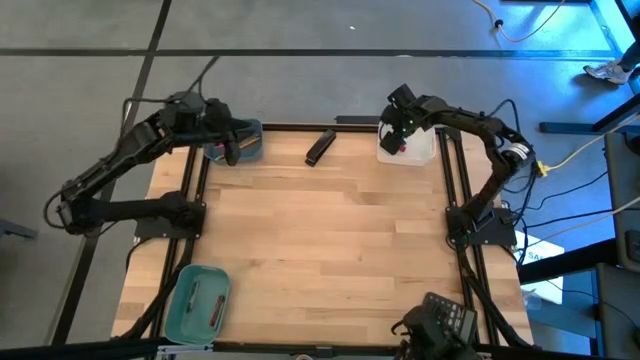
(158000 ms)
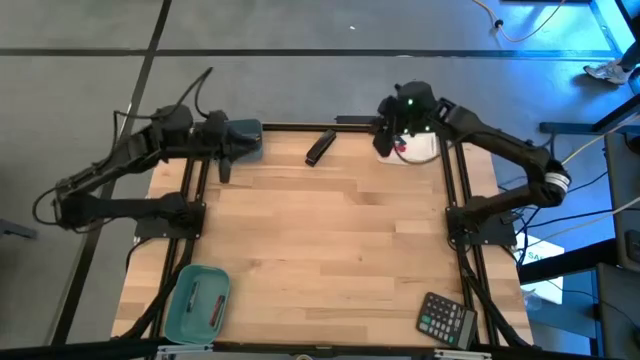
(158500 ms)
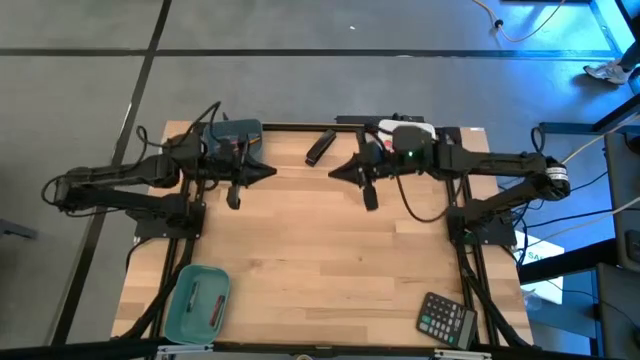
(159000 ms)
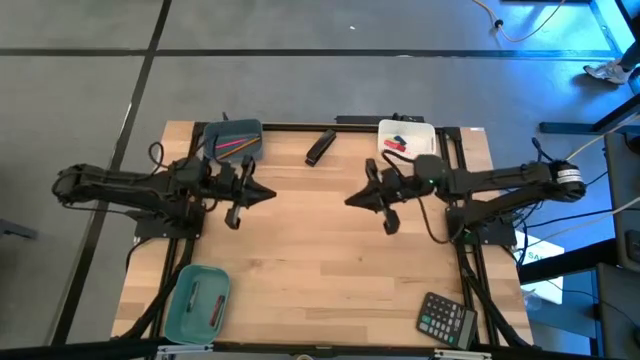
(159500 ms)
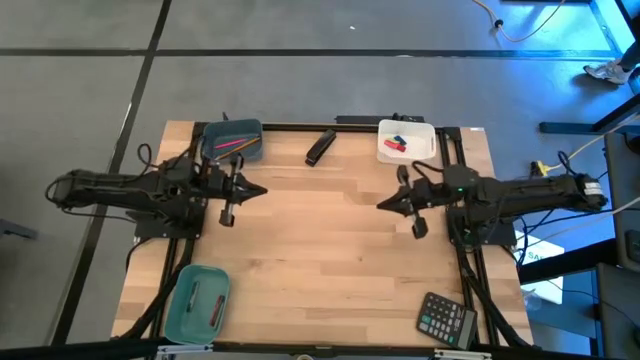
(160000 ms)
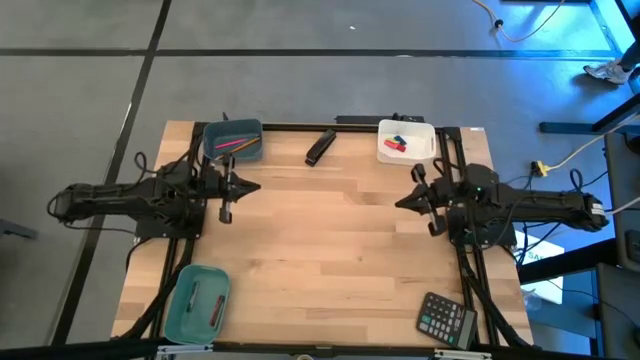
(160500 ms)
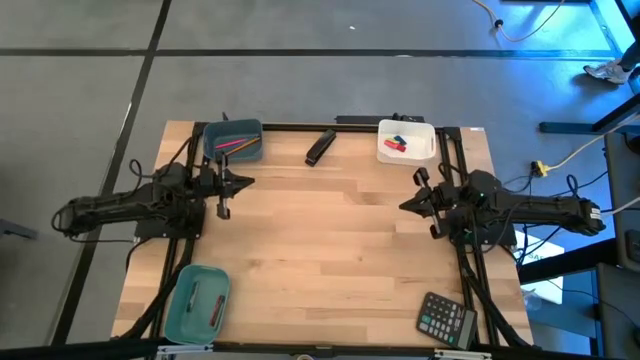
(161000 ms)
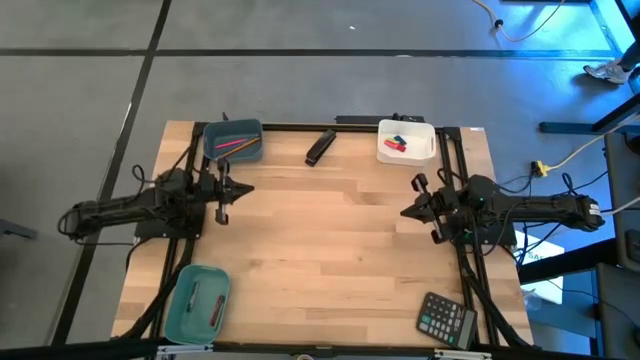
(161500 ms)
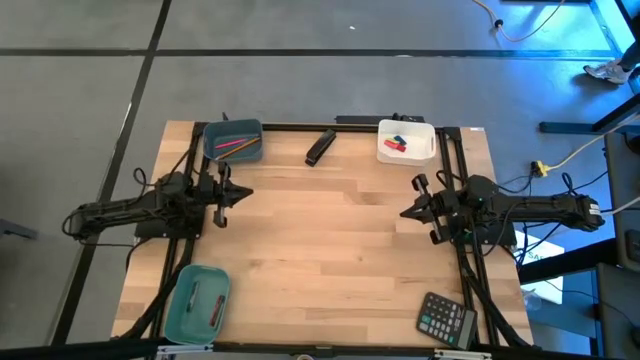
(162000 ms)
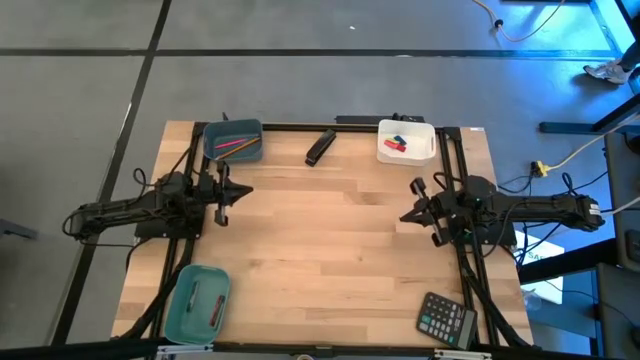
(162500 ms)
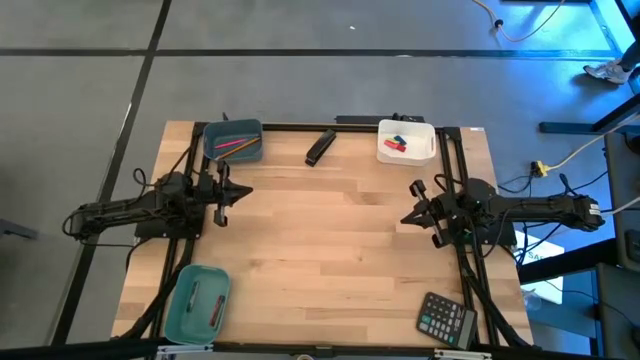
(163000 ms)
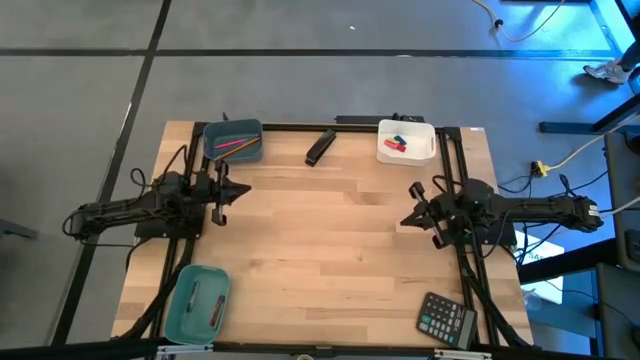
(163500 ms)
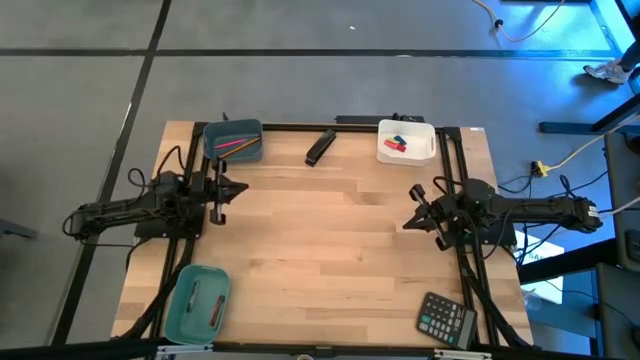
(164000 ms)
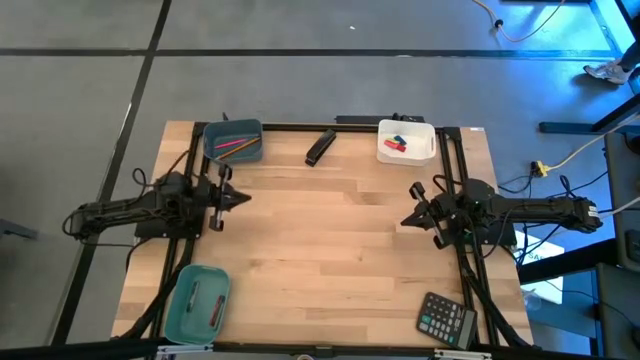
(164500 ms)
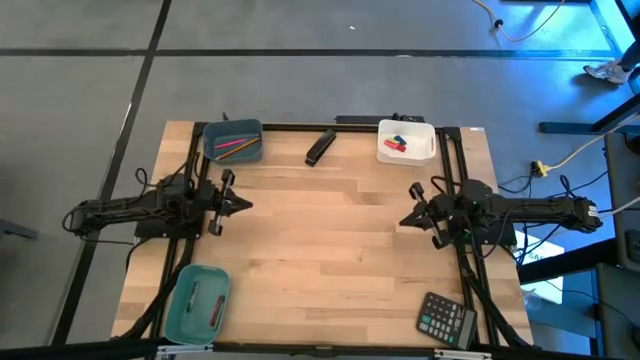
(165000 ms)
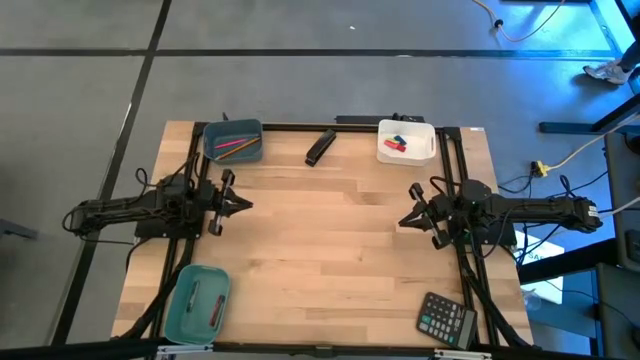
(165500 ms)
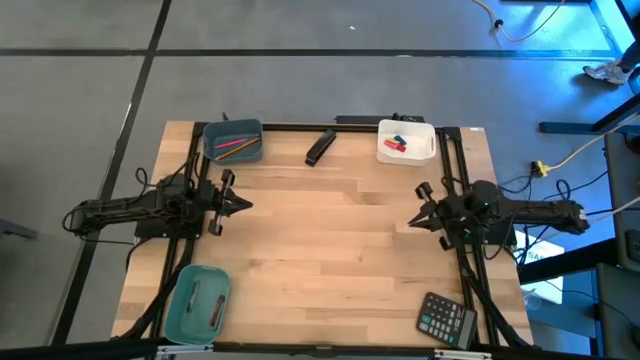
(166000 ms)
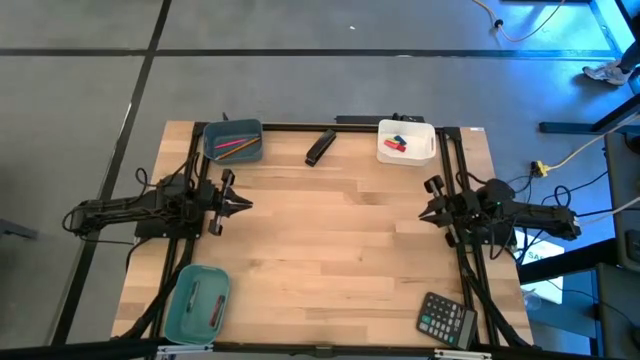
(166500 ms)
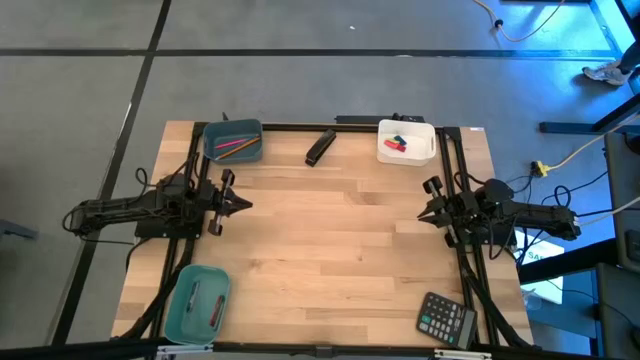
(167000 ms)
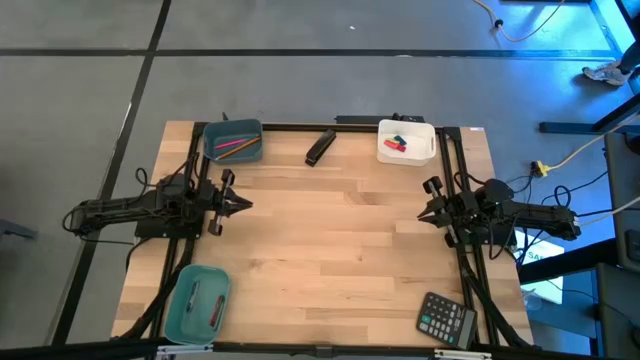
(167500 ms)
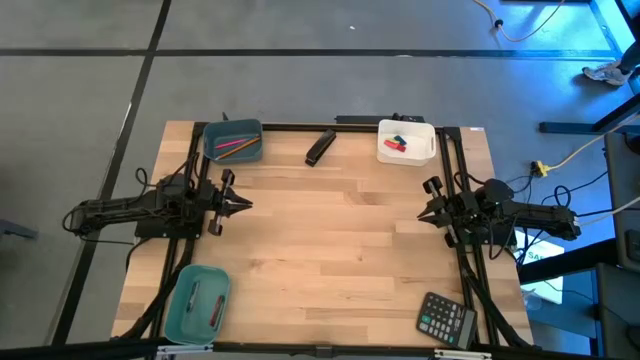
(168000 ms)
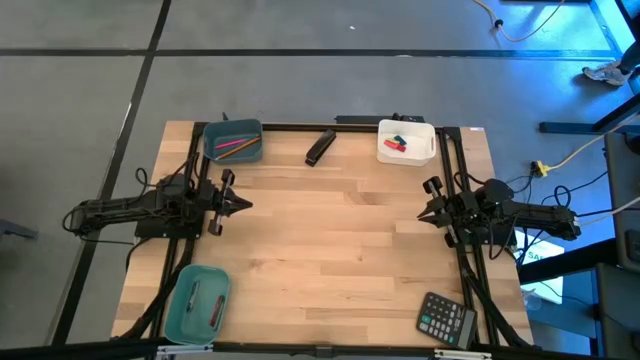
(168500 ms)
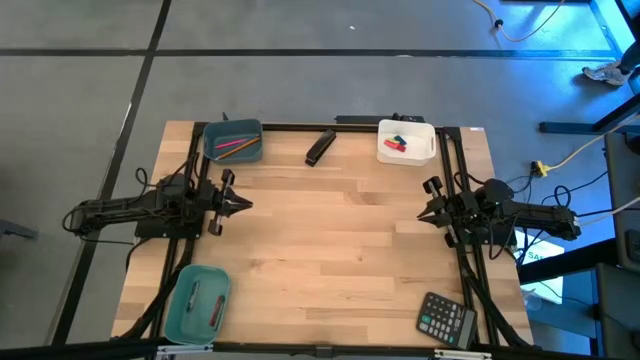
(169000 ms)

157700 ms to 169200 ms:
Task: Sort crayons/erasers/pens/pencils in bins
Return to Home Position

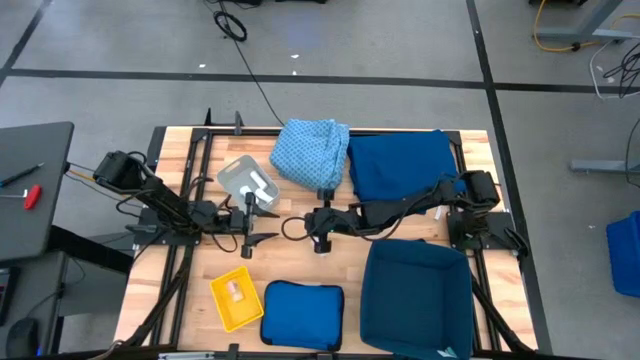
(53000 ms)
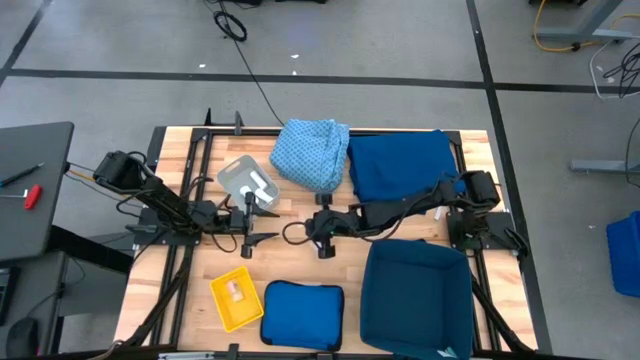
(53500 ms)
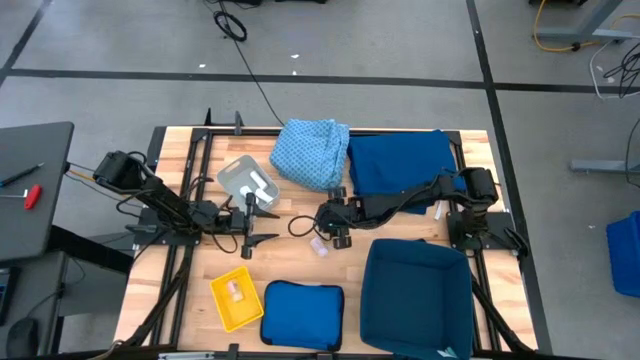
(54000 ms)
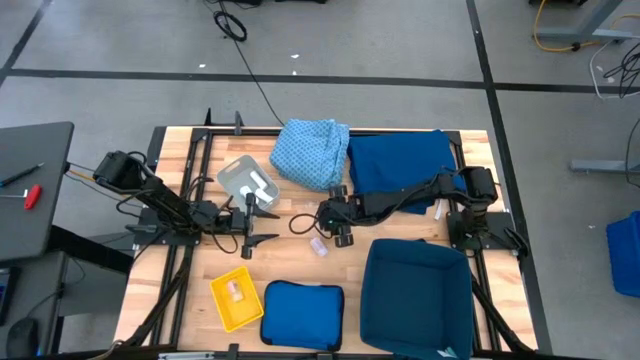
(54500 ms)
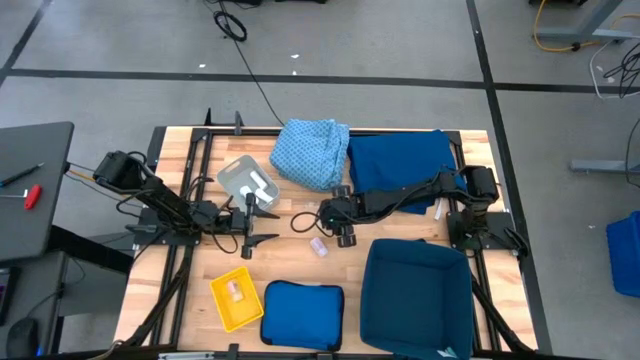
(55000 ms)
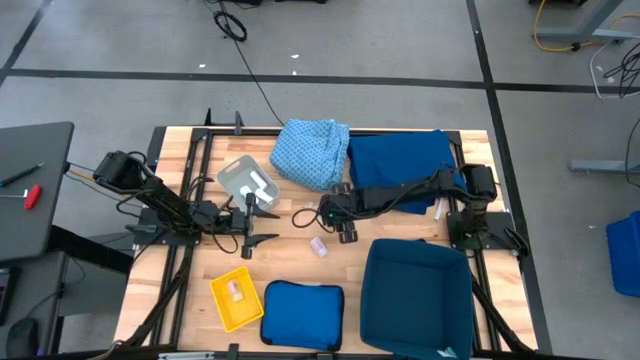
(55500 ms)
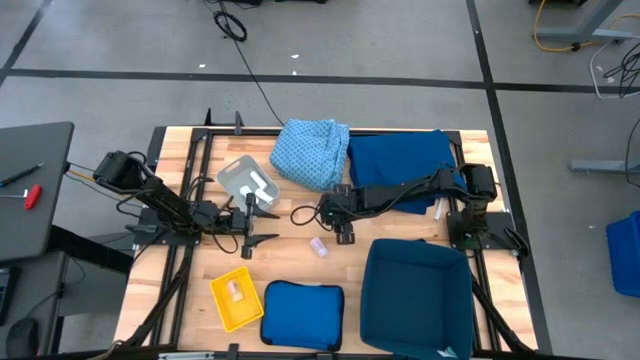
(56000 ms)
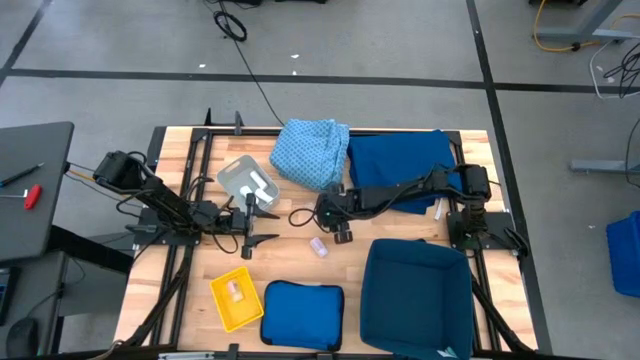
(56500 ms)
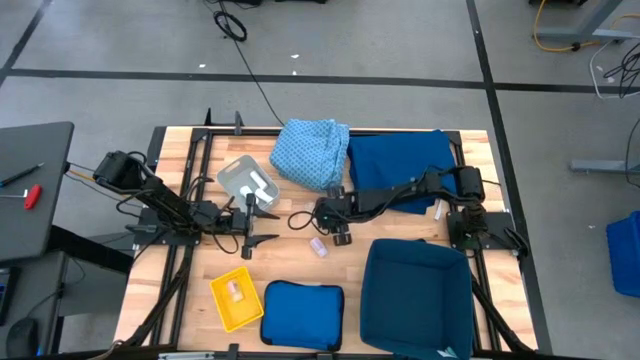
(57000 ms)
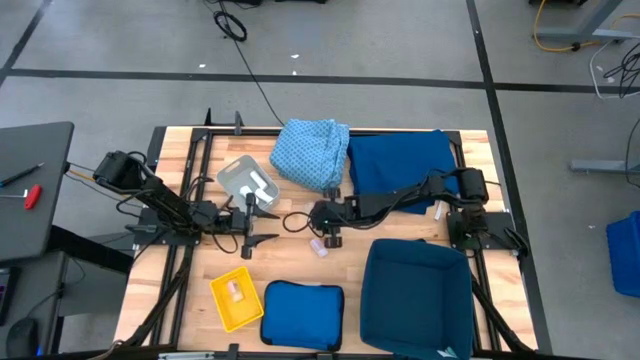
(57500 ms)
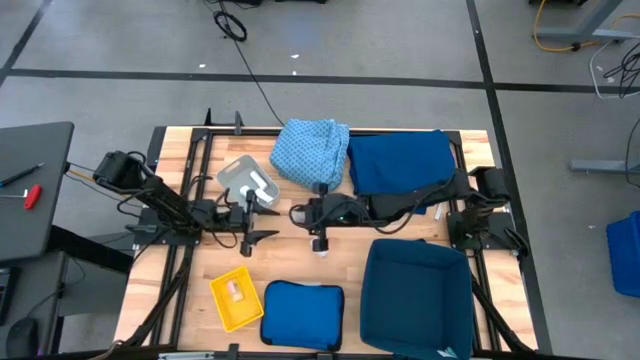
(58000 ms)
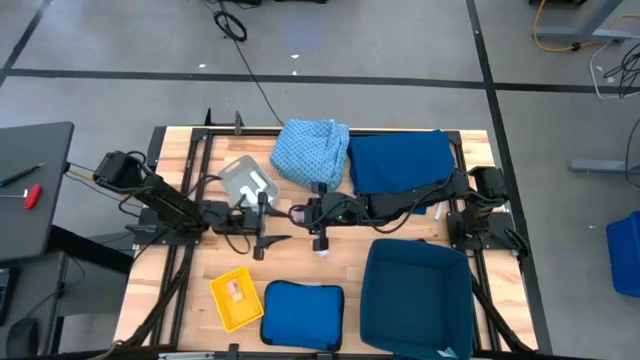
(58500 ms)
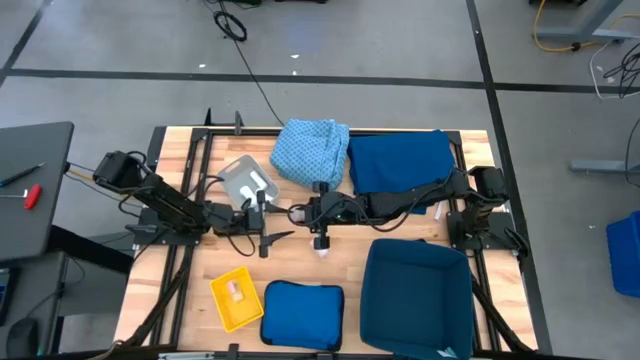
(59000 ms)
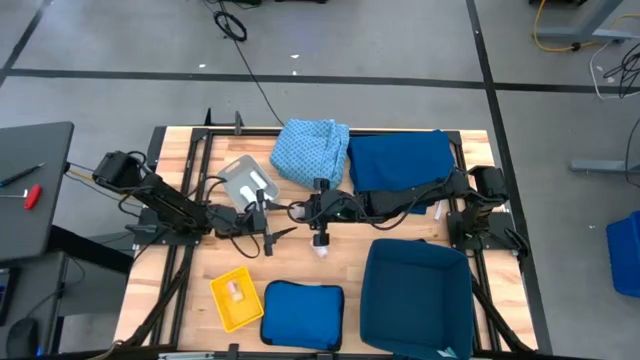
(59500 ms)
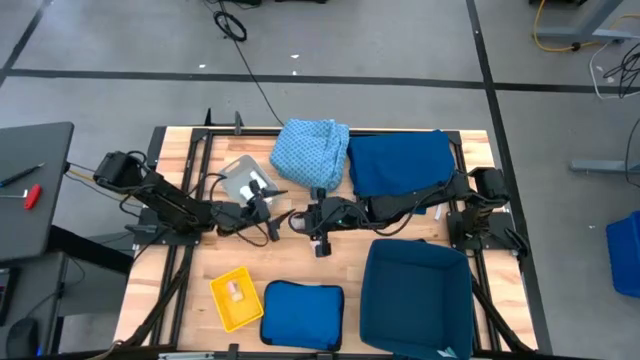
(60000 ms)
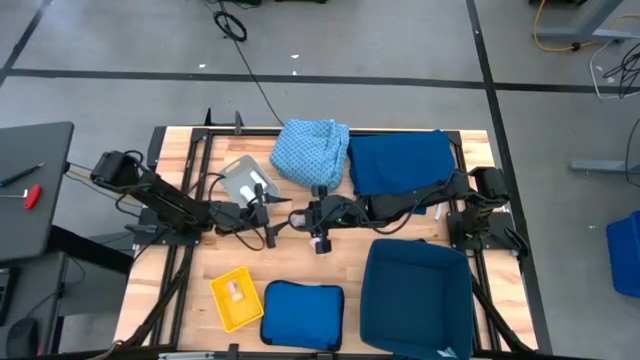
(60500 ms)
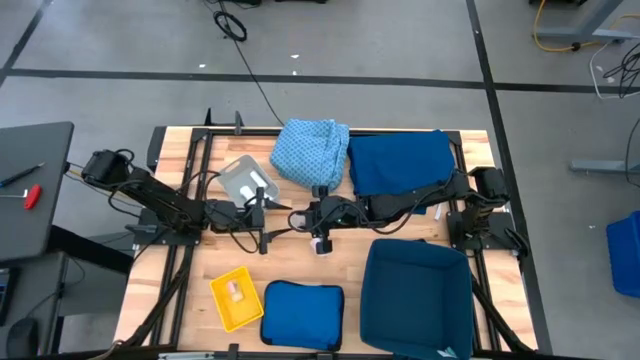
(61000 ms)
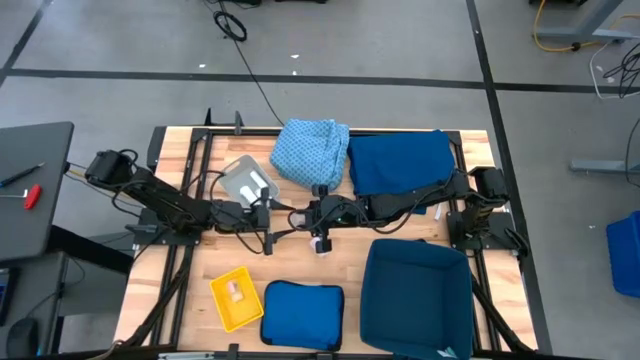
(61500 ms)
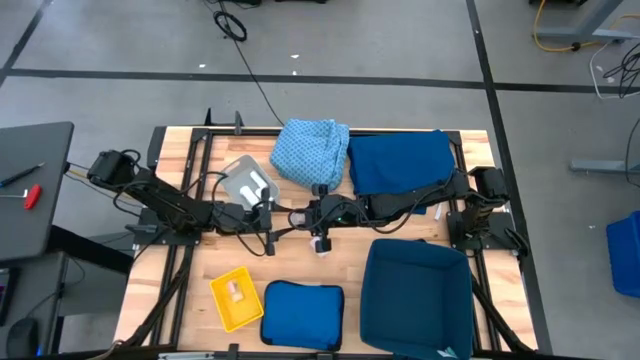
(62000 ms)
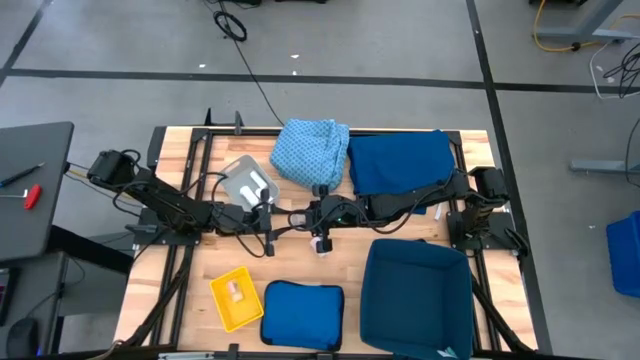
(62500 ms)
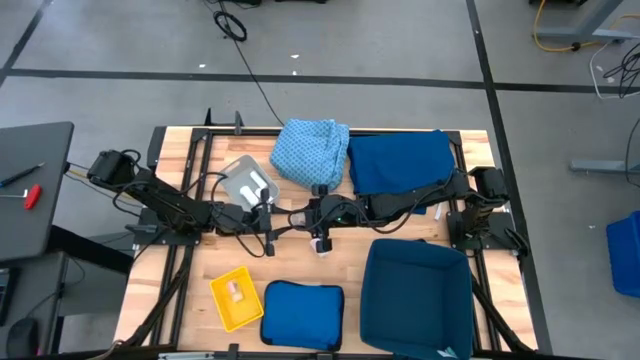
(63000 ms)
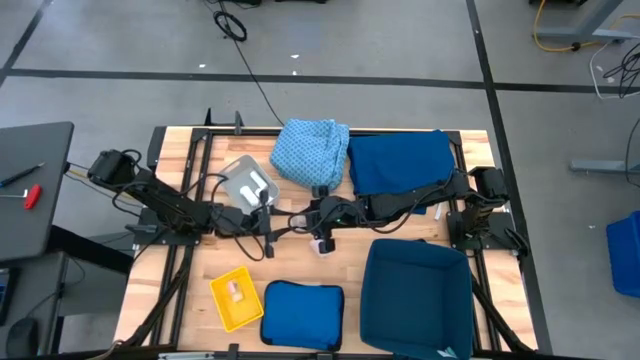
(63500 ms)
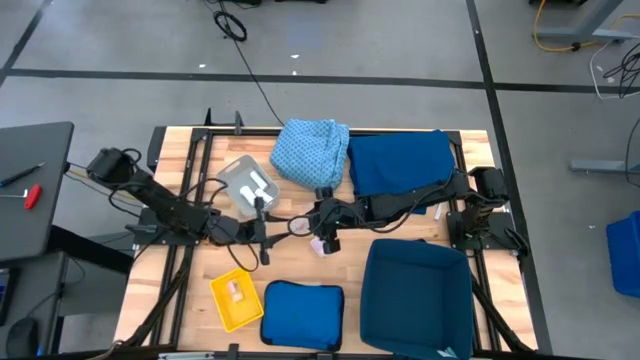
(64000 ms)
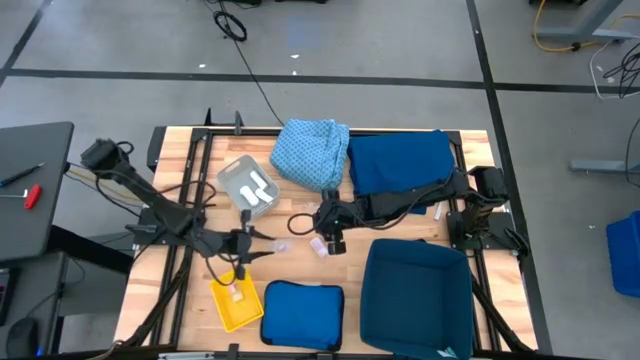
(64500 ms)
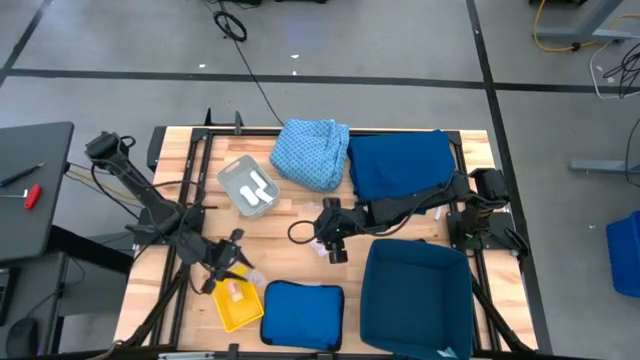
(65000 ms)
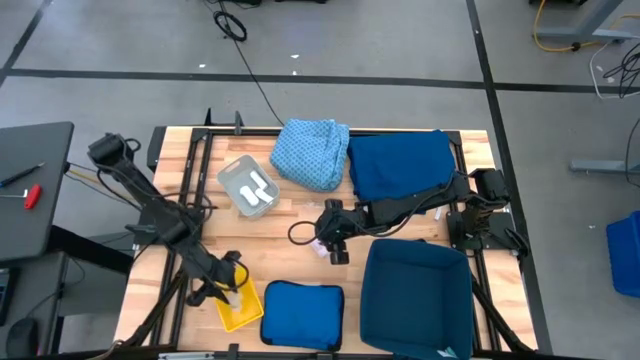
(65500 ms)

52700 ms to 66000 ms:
Task: Pick & place medical supplies in basket/bin
Put the top white medicine bottle into the yellow bin
